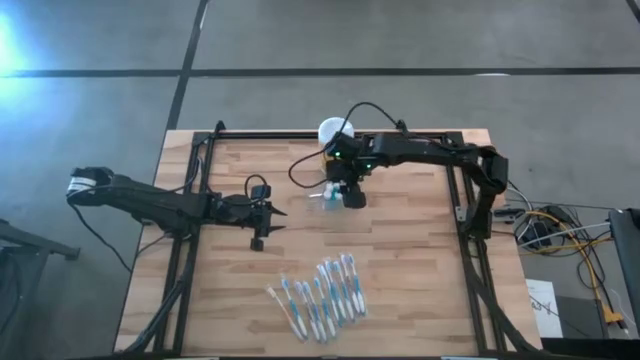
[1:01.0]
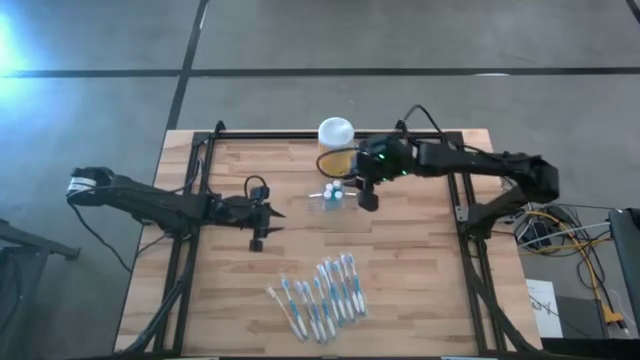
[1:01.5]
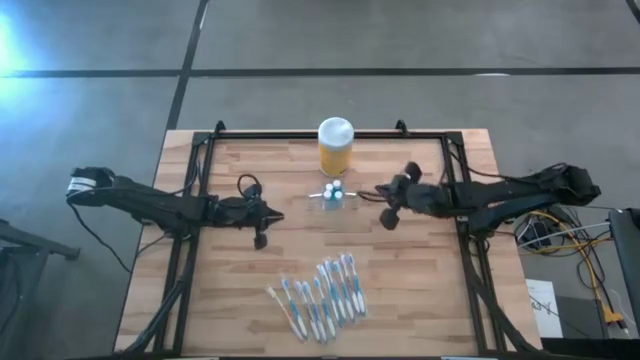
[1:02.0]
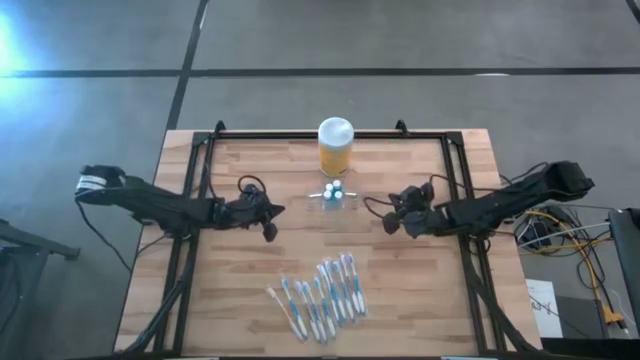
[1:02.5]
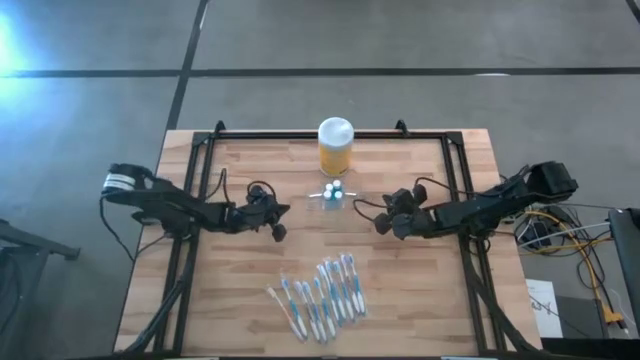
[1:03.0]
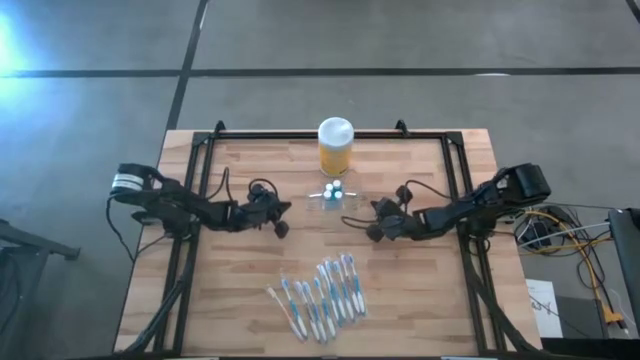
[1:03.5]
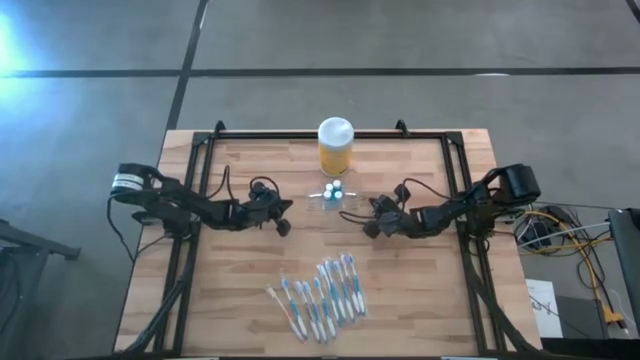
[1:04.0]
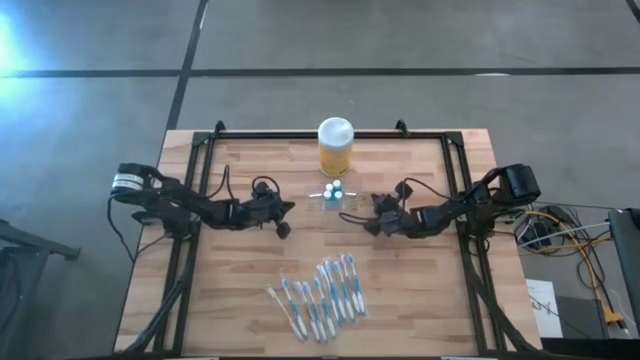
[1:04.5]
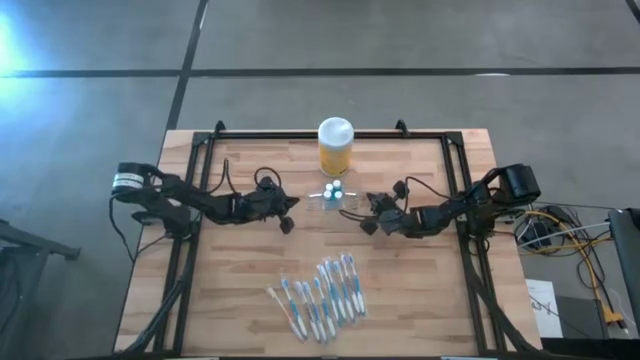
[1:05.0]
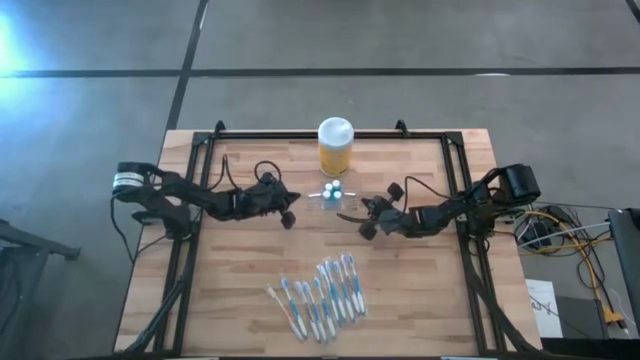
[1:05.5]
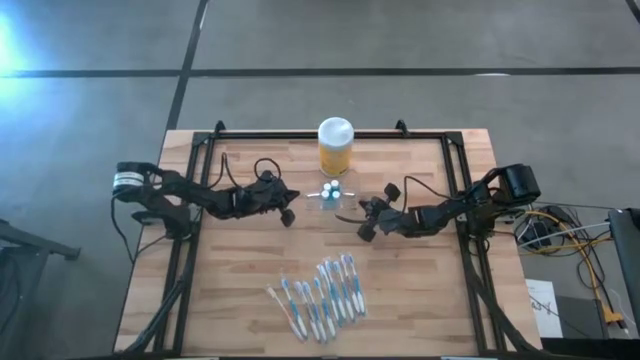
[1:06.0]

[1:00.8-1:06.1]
Task: Pick & Place toothbrushing station
Adjust the transparent organizer

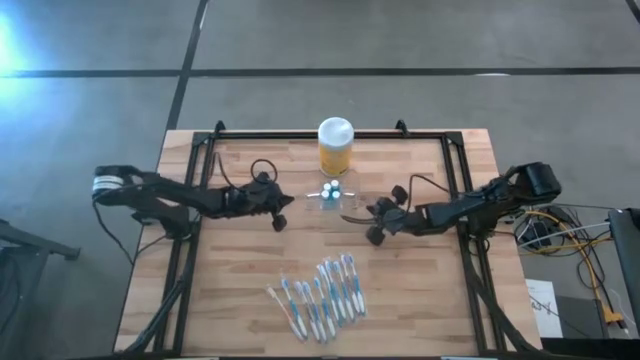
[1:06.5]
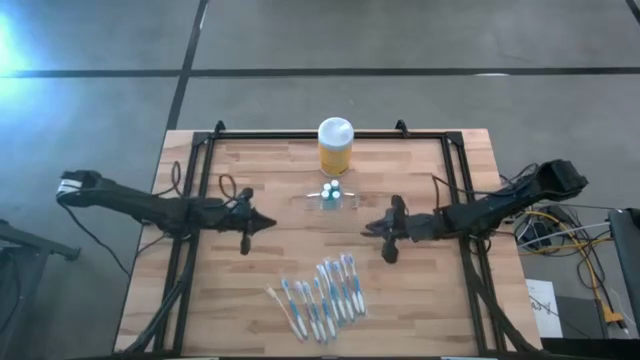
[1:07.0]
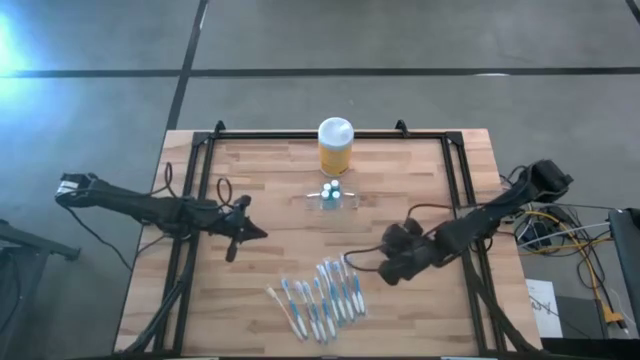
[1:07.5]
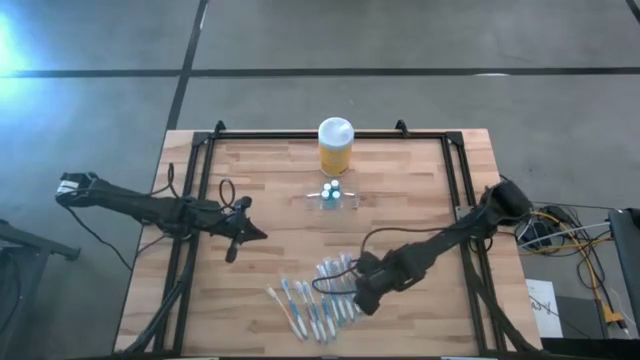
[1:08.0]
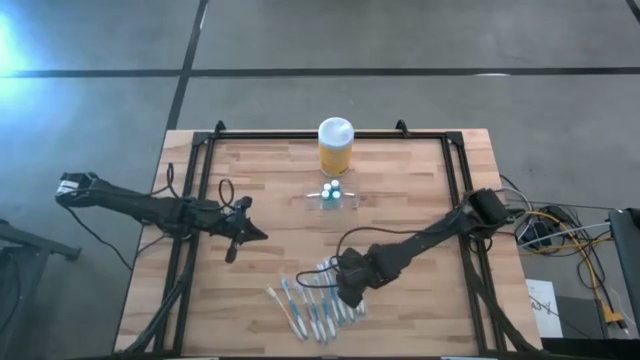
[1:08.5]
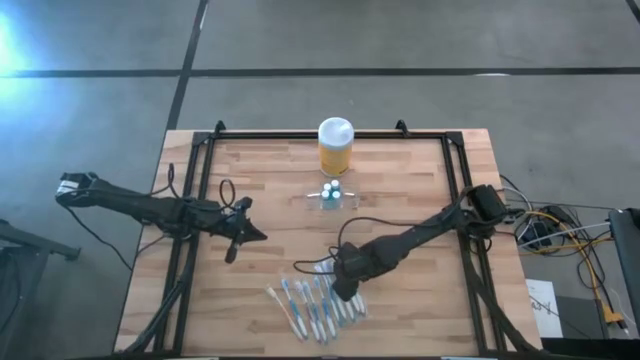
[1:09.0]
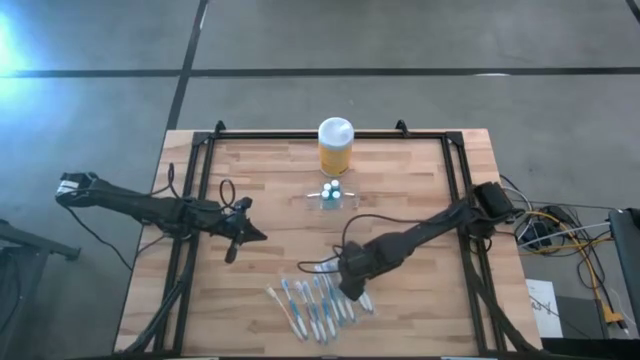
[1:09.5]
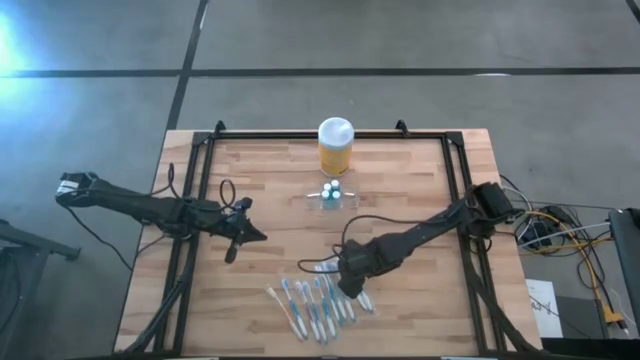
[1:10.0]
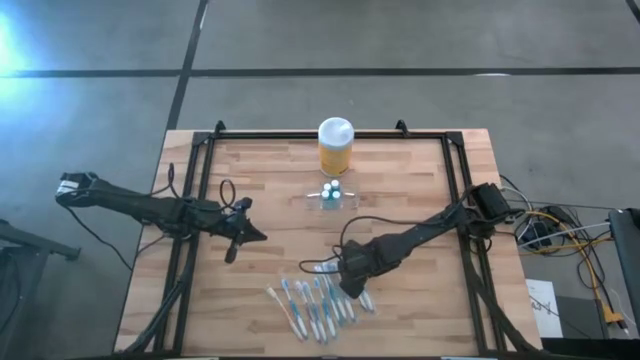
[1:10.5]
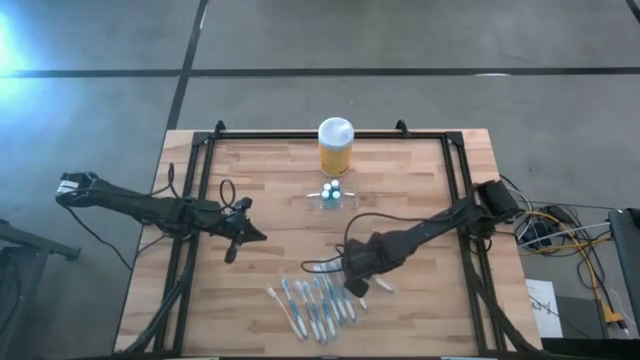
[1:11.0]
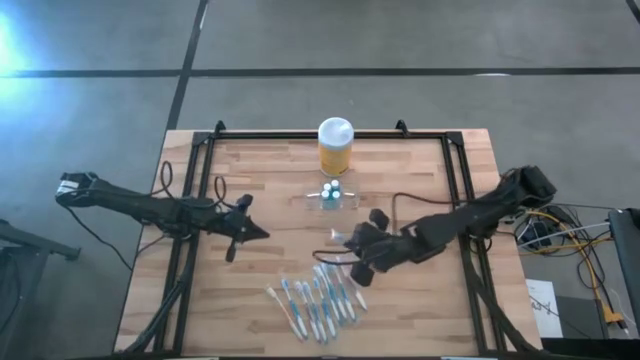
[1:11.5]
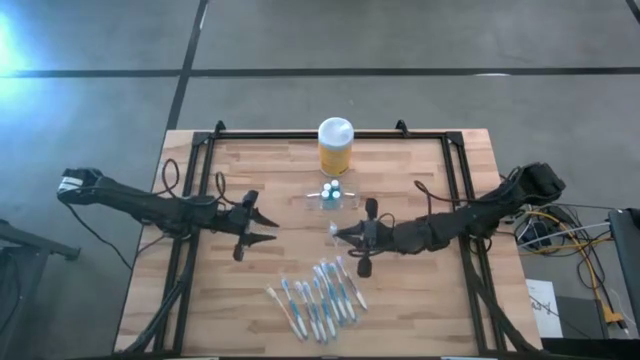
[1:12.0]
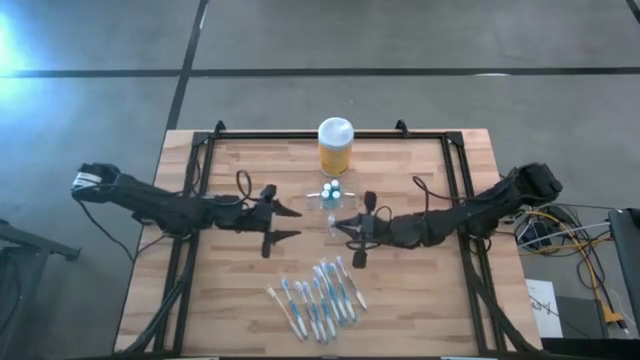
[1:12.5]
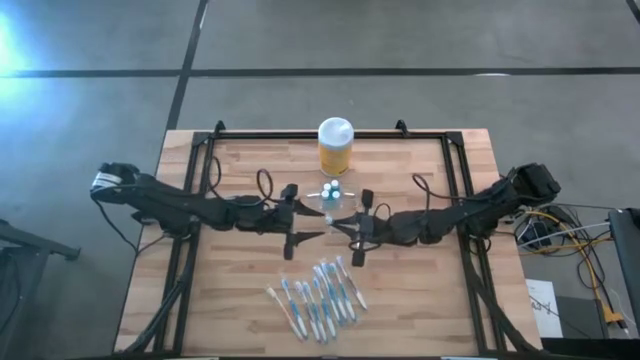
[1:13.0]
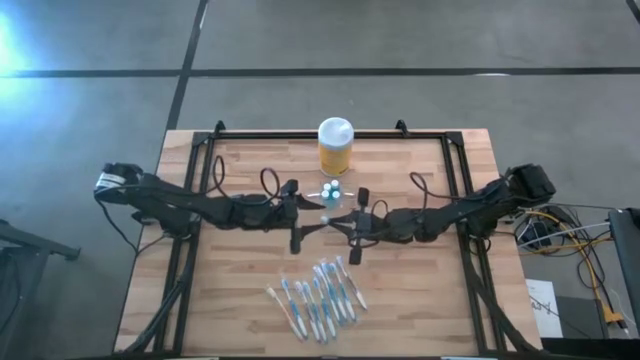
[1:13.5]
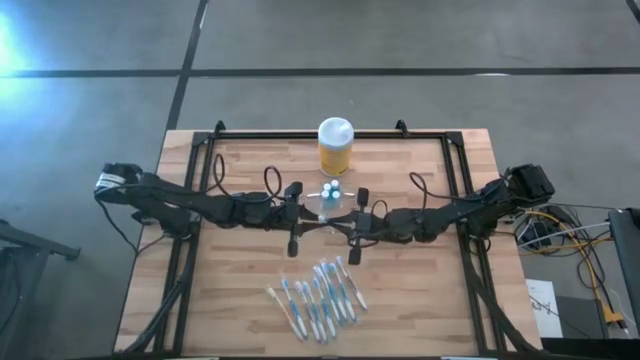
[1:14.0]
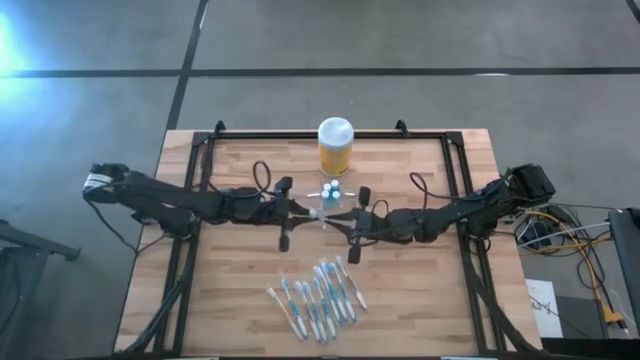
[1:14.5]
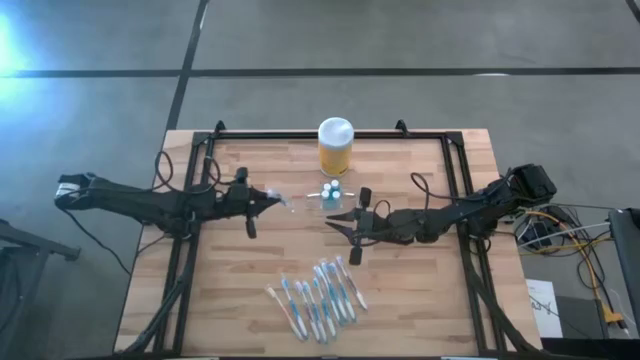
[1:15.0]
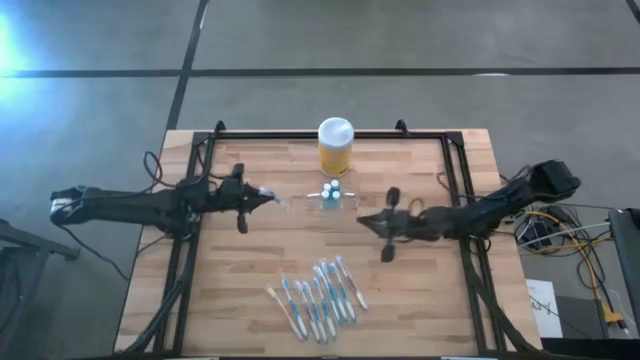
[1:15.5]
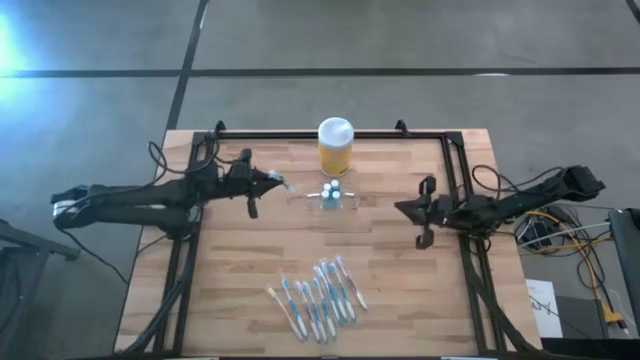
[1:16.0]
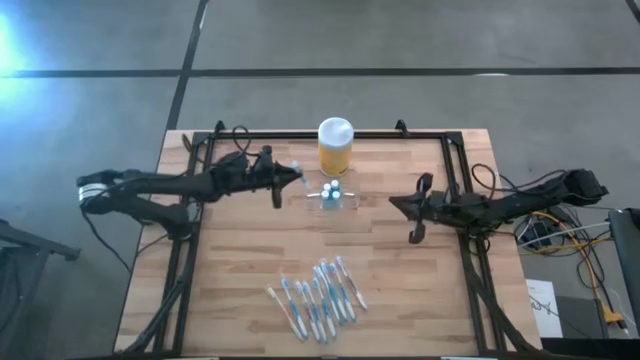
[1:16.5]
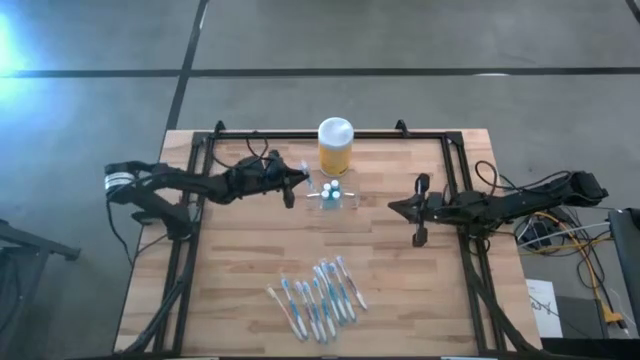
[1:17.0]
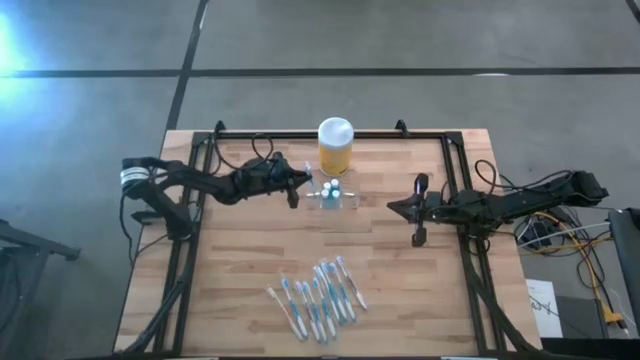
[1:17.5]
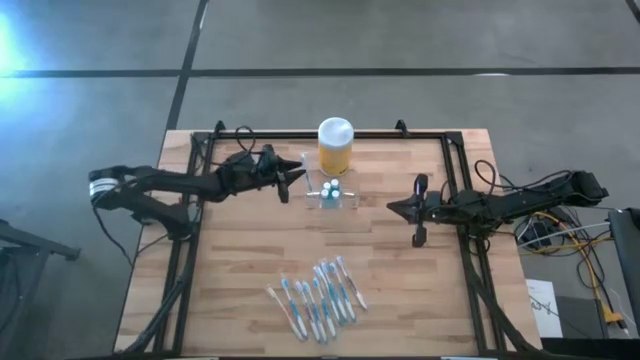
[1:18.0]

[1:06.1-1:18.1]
Put the blue toothbrush into the transparent organizer

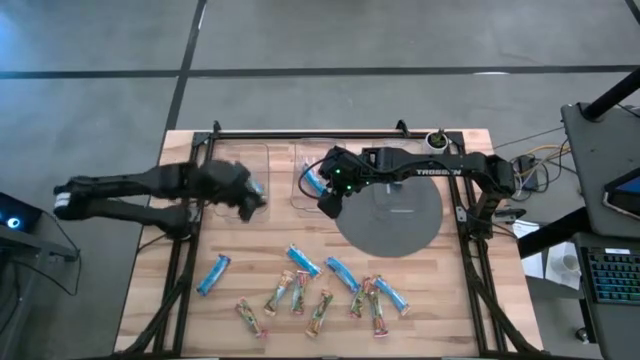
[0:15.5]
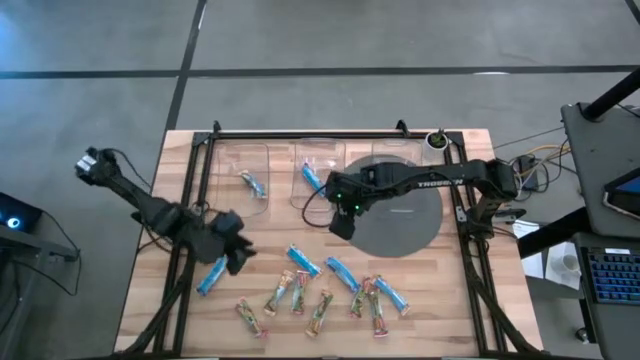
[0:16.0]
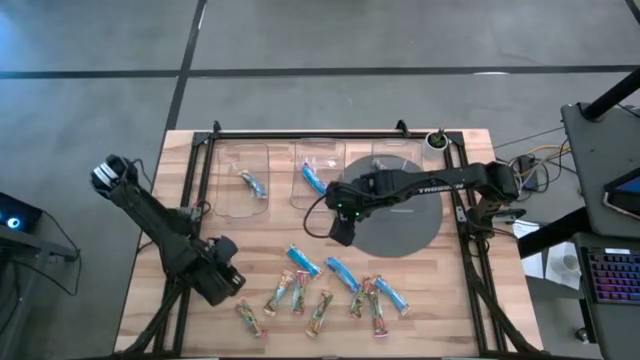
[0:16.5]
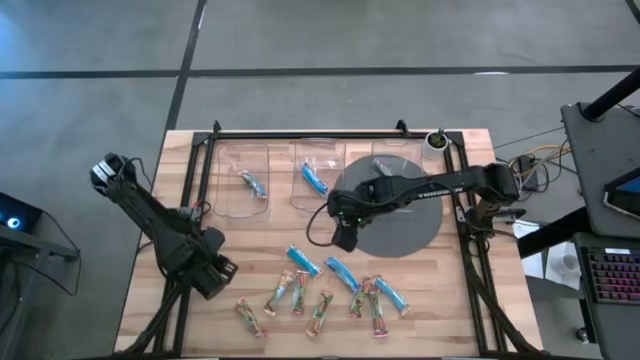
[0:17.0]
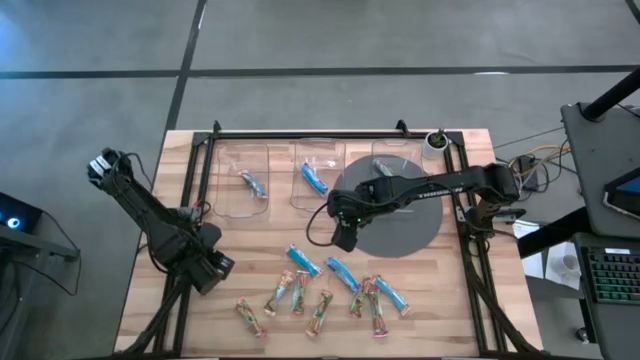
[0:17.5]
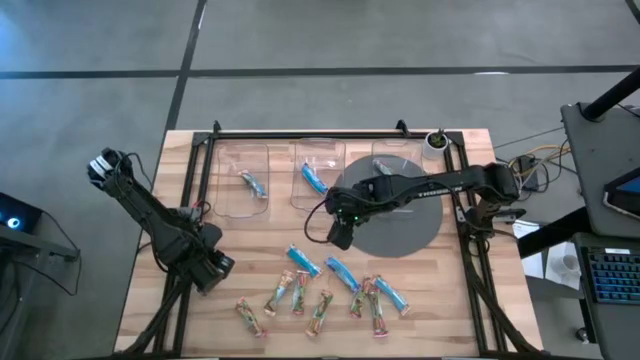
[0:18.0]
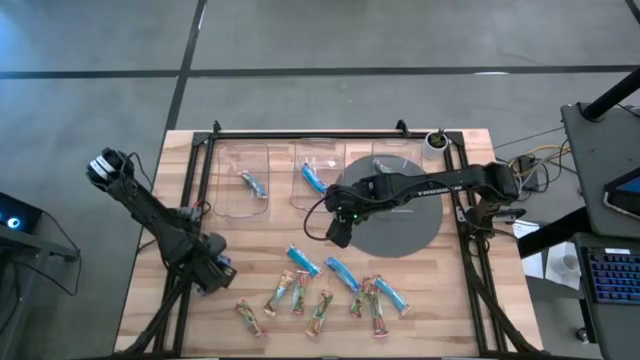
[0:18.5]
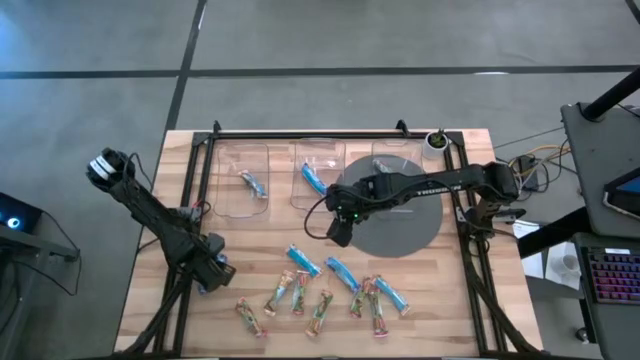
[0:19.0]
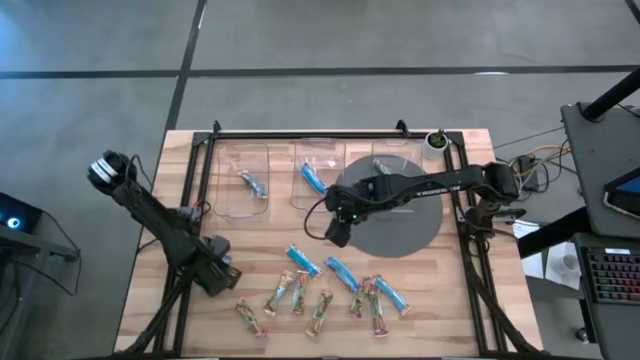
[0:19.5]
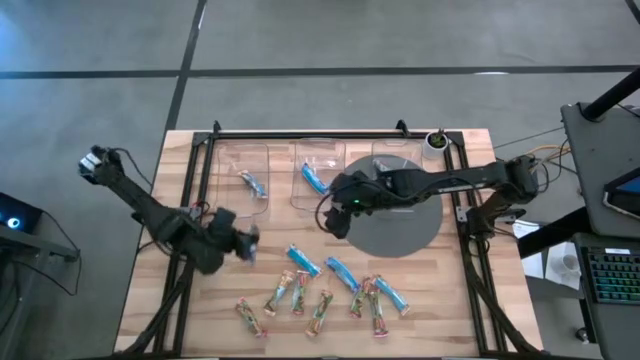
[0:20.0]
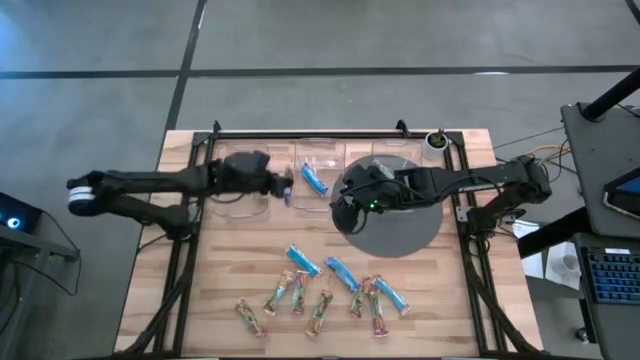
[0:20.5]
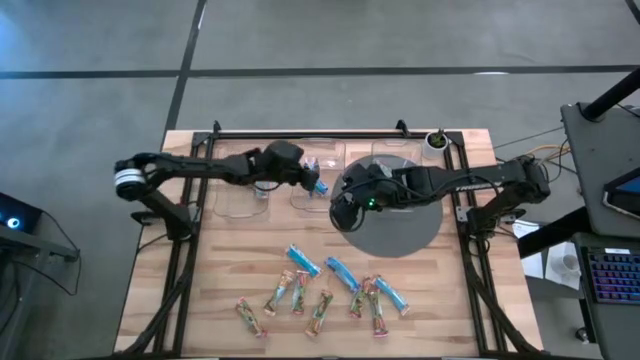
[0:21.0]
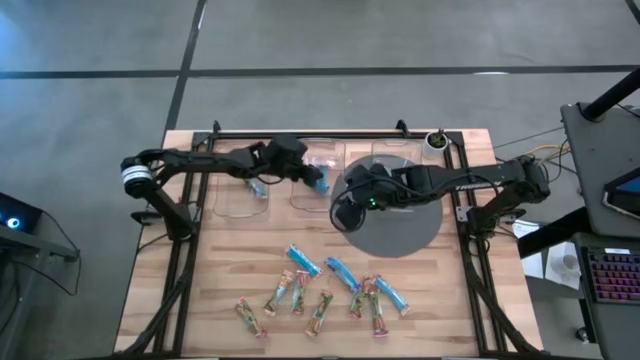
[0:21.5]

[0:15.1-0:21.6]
Task: Pick and place Granola Bars by type
Put the blue granola bar into the middle transparent container
